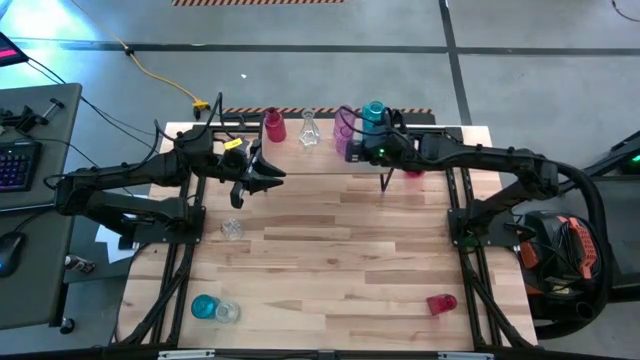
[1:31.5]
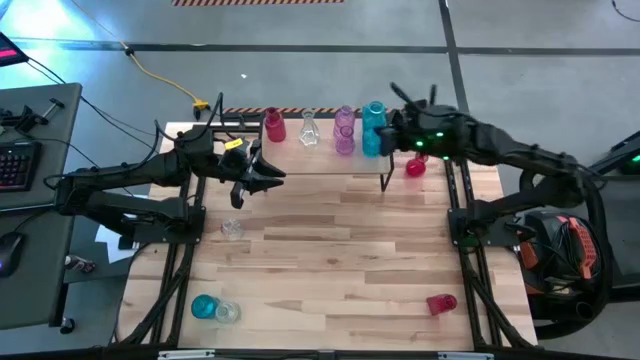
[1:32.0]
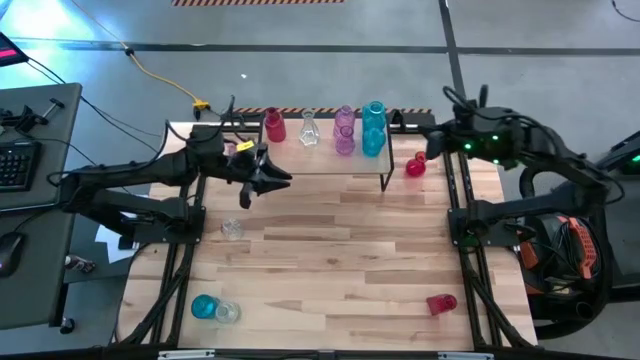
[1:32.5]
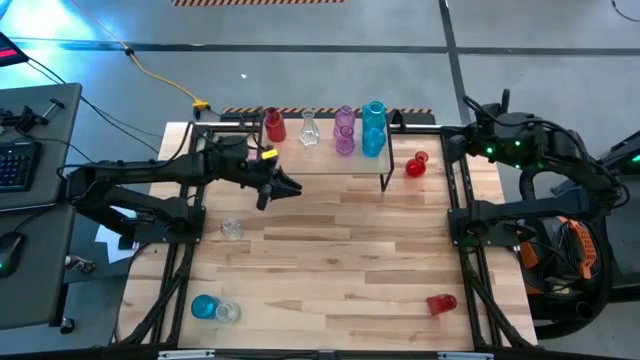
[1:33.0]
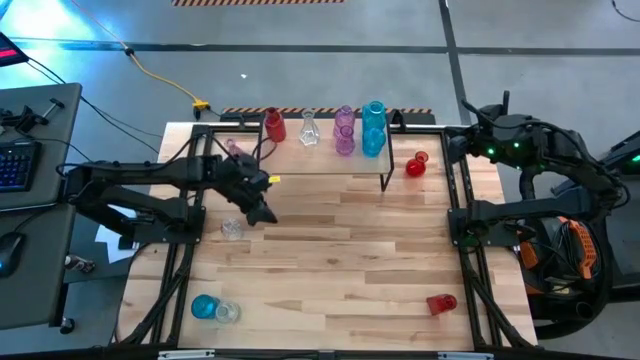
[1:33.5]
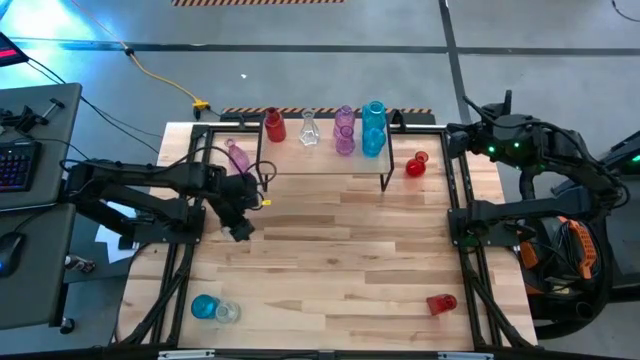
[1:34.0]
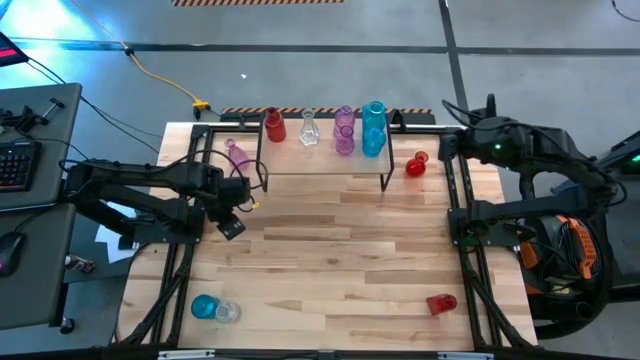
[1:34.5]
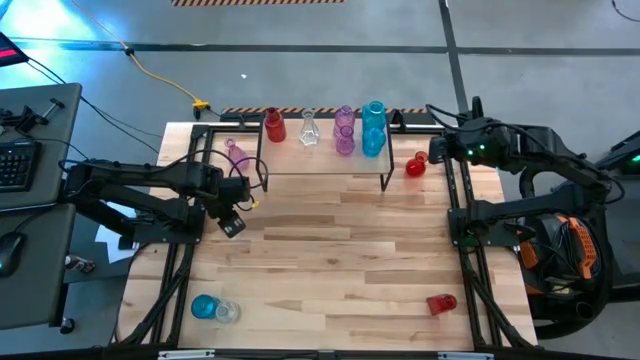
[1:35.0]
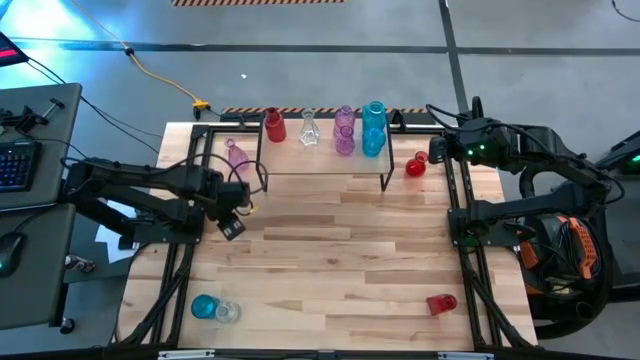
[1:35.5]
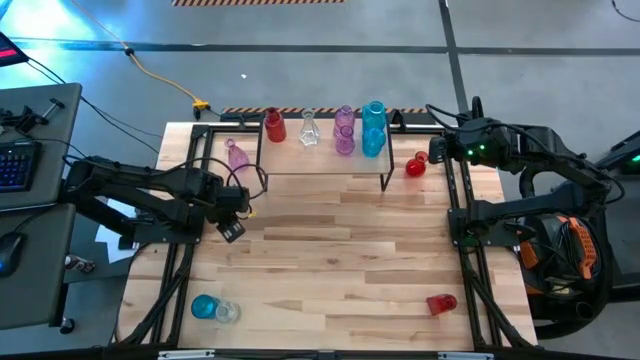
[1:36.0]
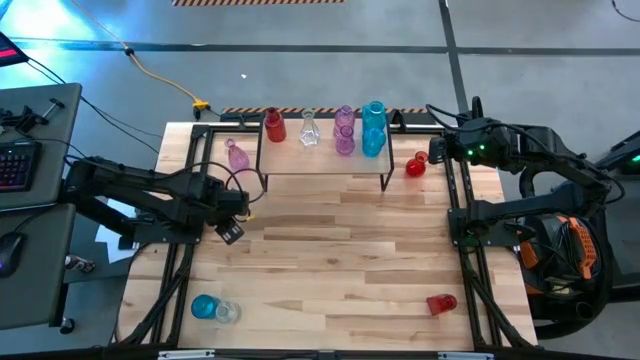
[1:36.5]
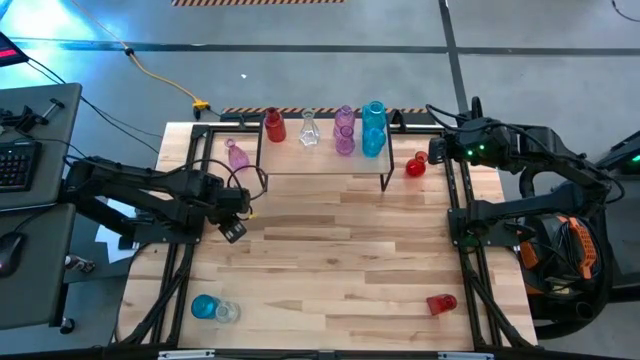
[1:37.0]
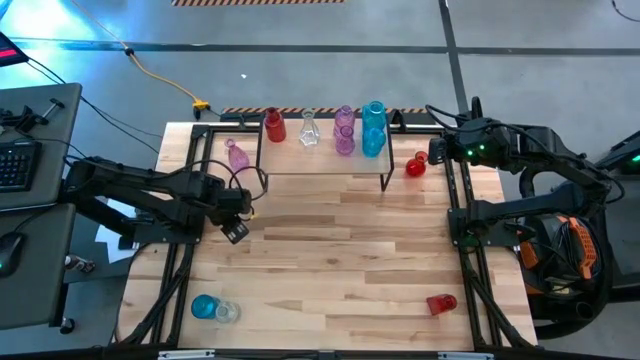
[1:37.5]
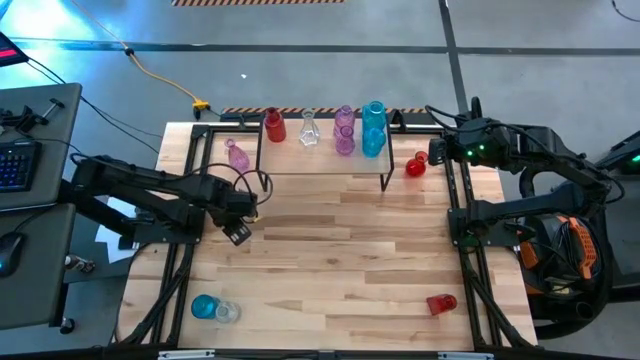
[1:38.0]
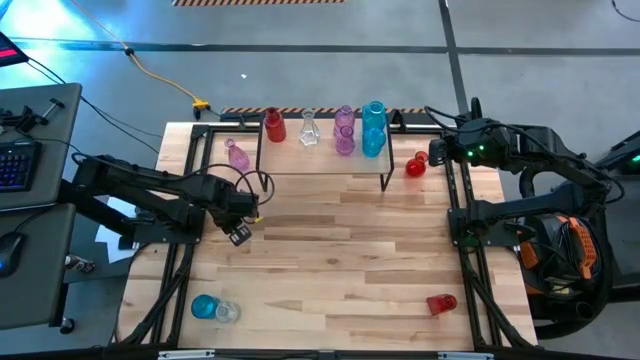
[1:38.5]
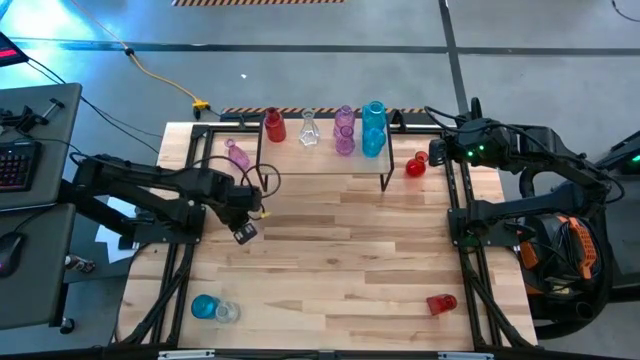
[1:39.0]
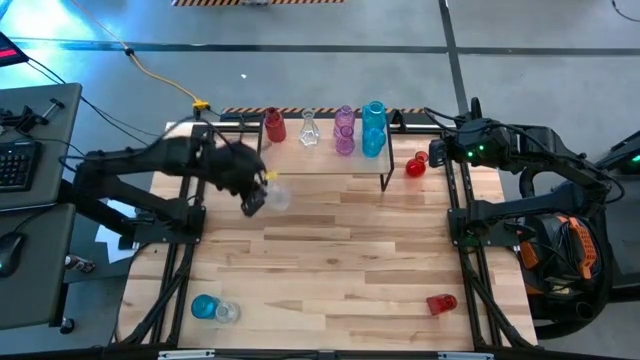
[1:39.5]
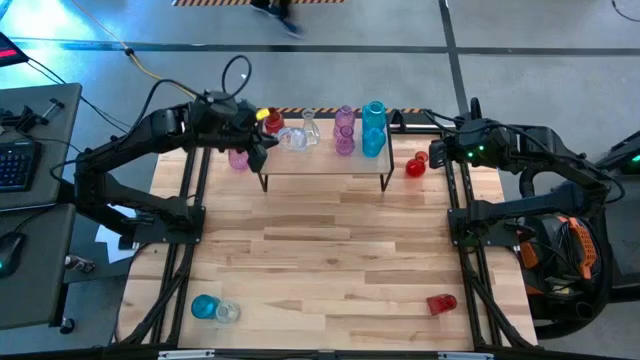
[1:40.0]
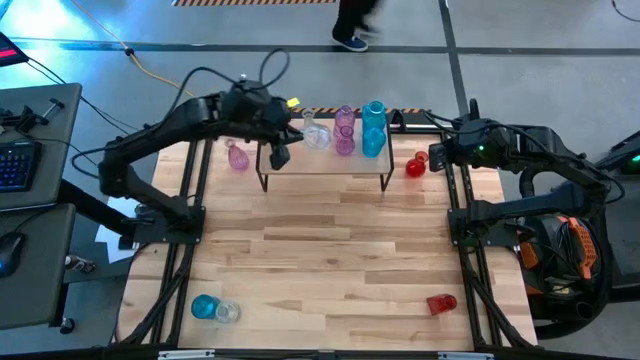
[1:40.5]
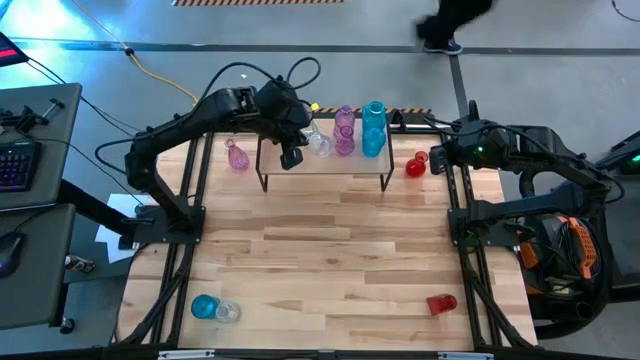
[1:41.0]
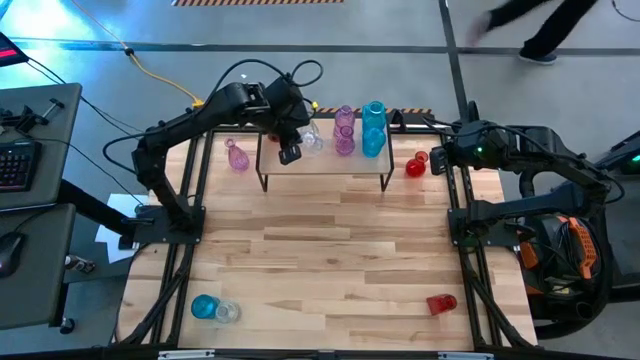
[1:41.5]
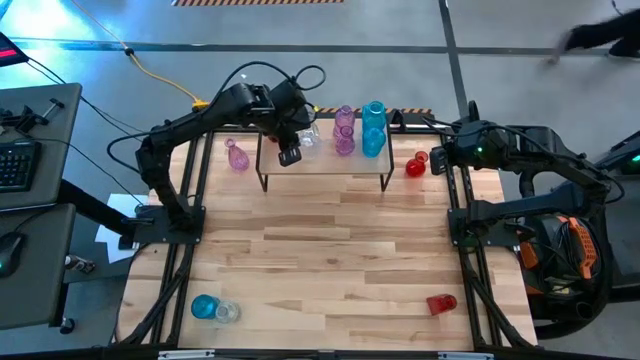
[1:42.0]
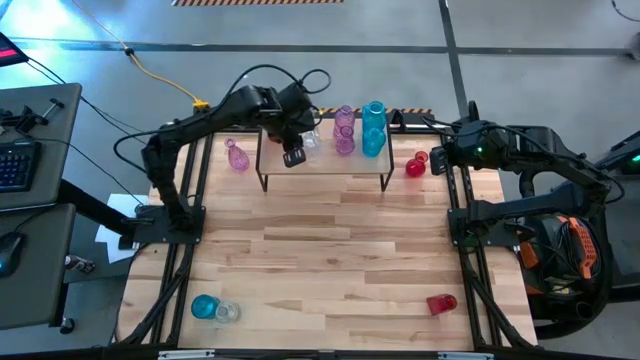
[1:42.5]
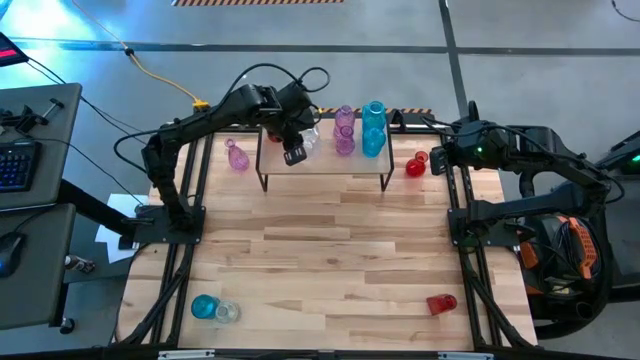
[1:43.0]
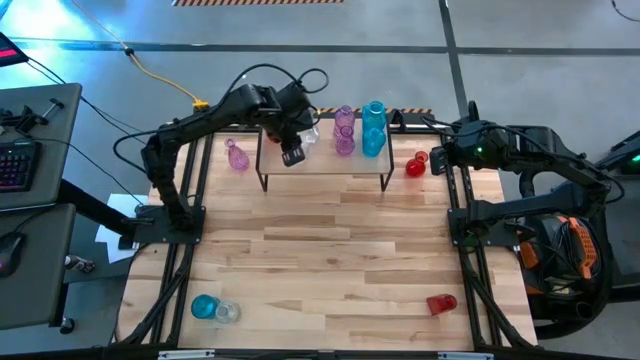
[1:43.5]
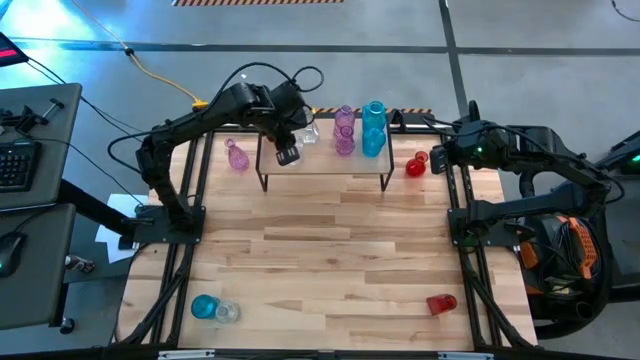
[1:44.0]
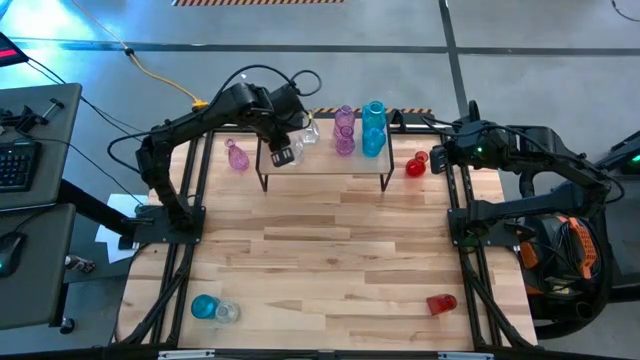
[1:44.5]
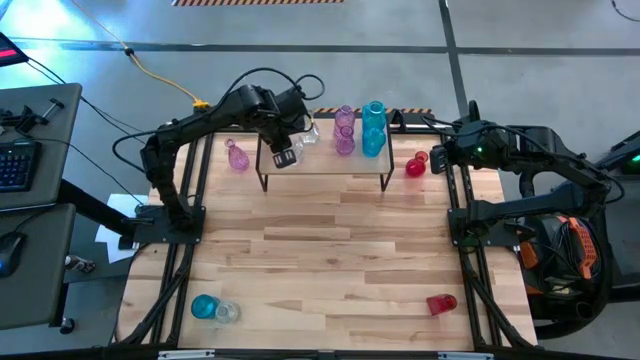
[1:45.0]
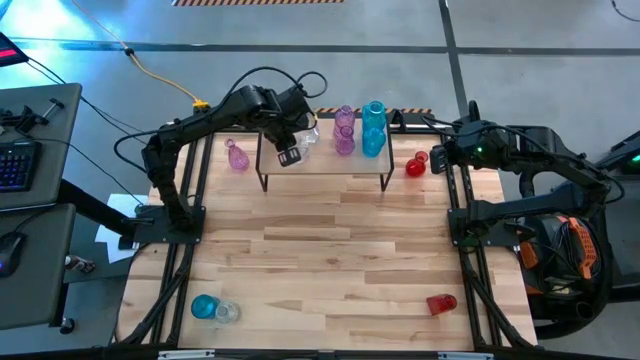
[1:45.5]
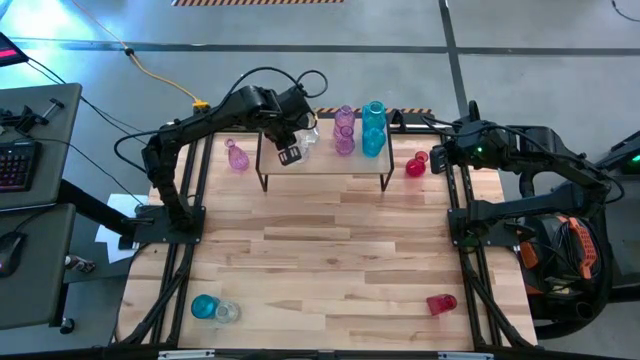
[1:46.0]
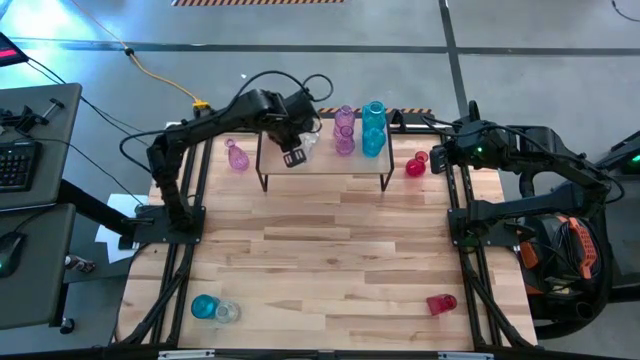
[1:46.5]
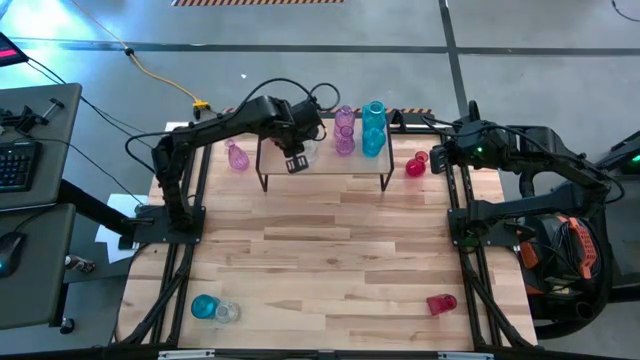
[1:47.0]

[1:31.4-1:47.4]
Task: sort vases onto shelf
Put the top transparent vase on the shelf aligned with the other transparent vase

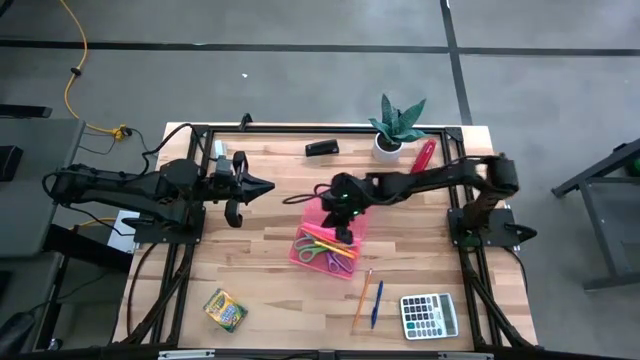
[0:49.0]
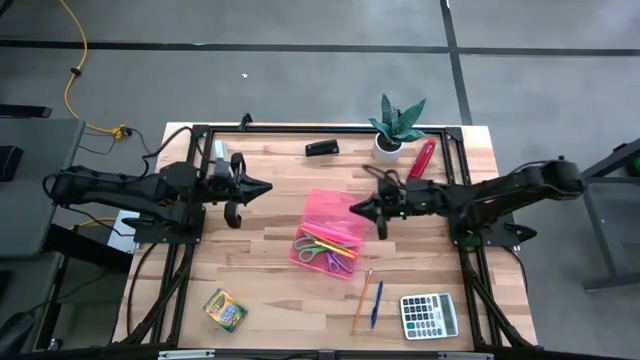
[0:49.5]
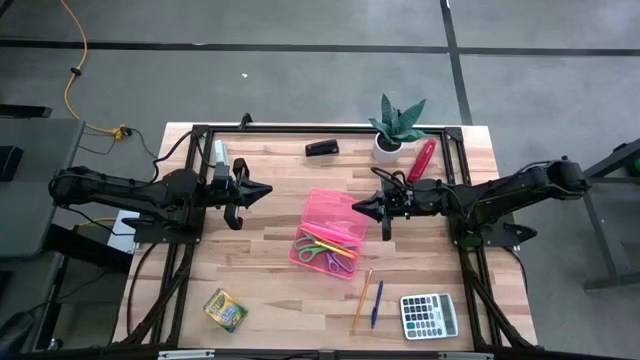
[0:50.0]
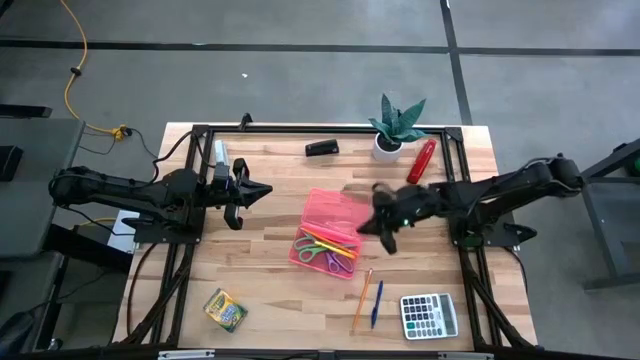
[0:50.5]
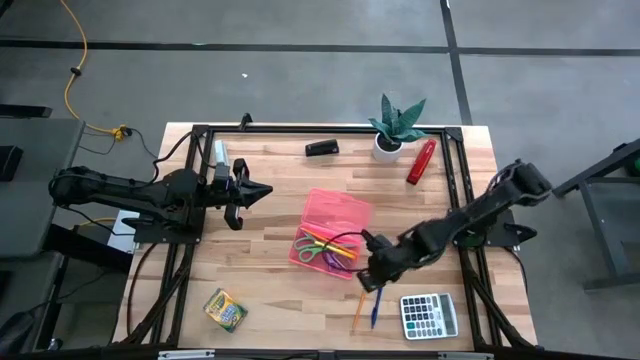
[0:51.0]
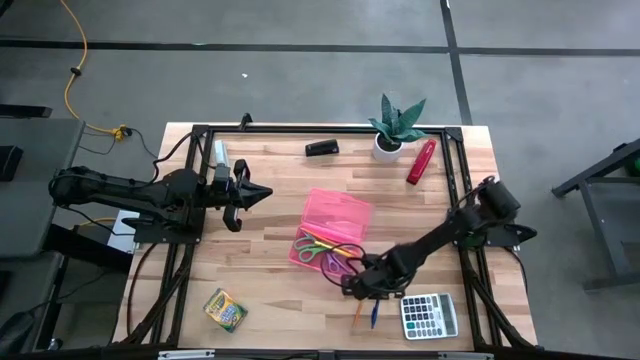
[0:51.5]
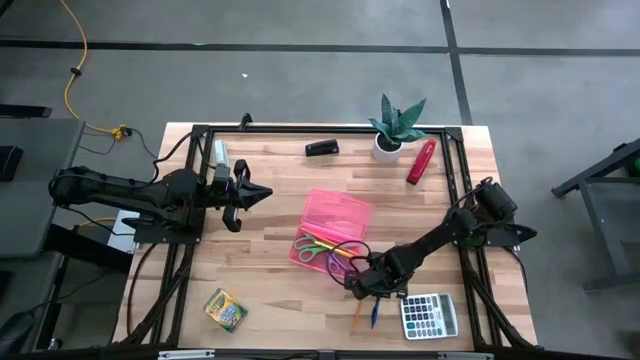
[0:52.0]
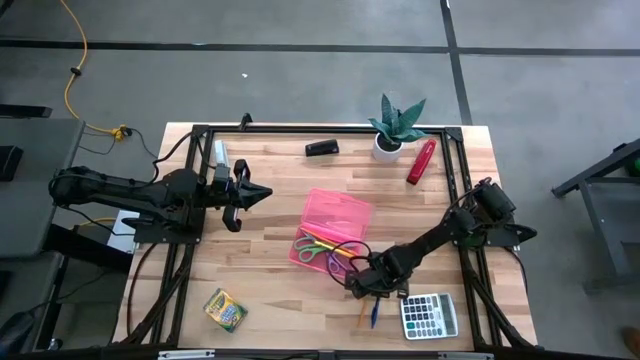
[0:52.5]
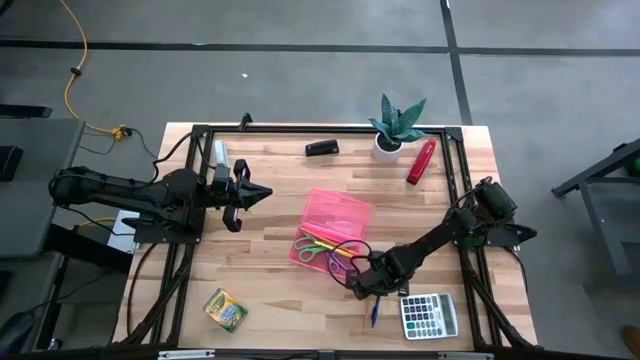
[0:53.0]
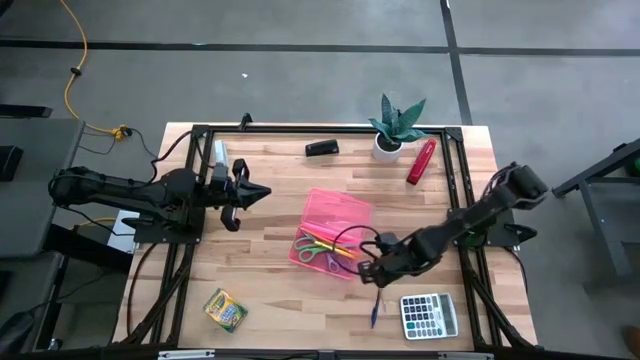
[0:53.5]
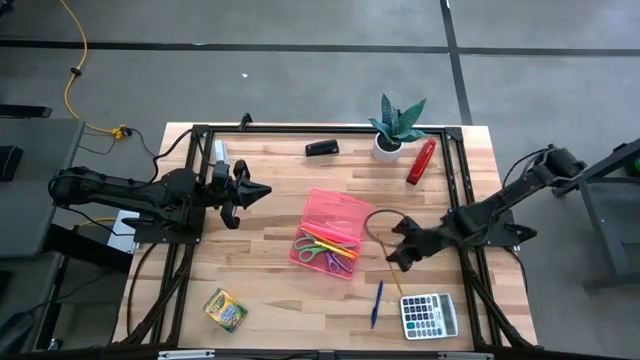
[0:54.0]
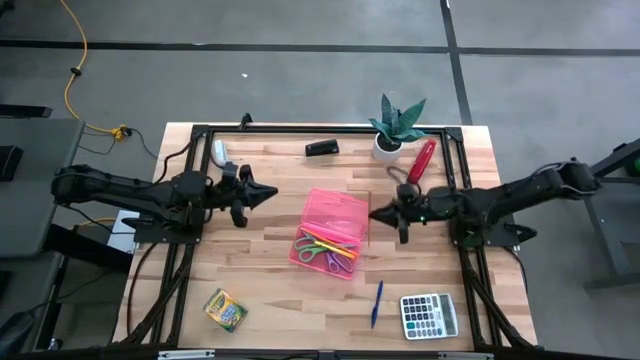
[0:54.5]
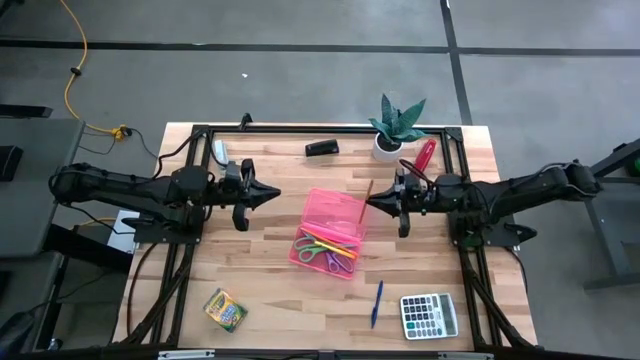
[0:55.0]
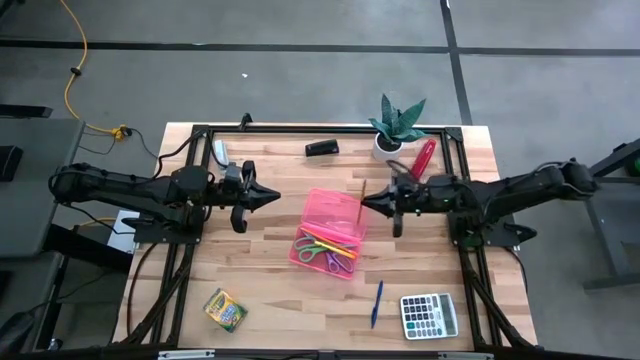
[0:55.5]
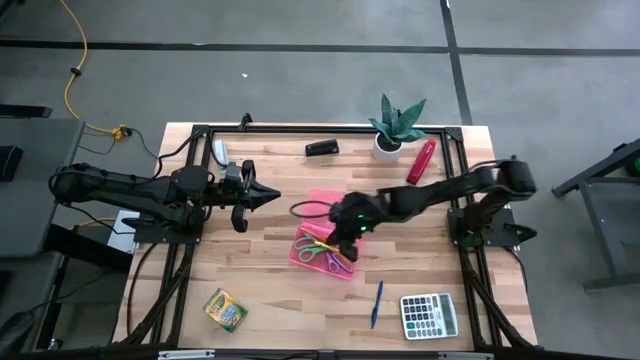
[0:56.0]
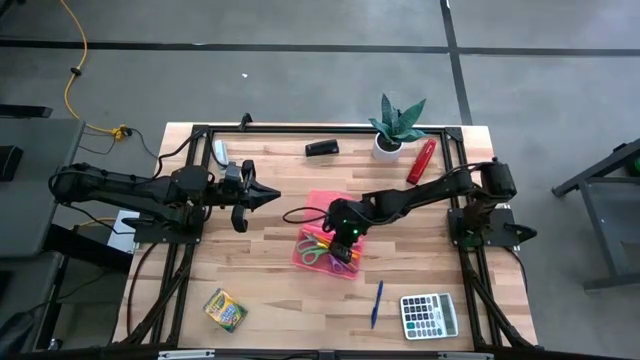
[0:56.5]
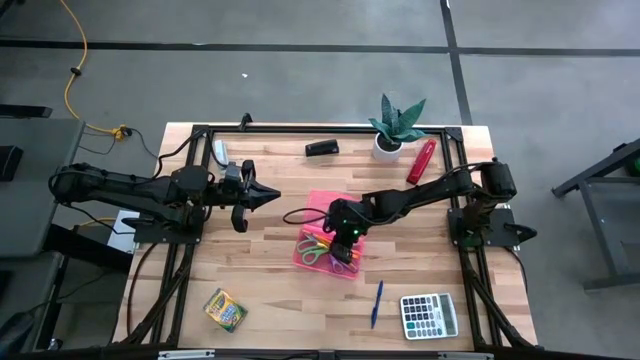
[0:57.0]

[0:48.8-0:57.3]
Task: Pick & place school supplies into a supply box
Put the bottom orange pencil into the pink supply box
